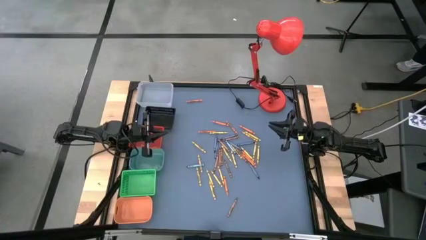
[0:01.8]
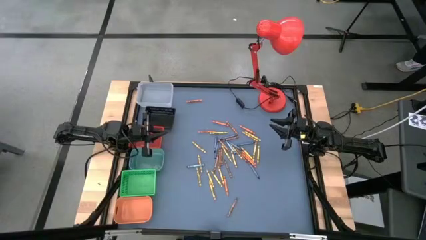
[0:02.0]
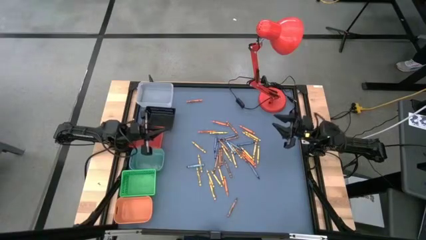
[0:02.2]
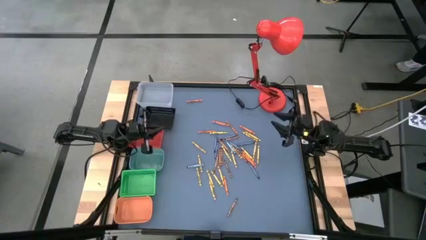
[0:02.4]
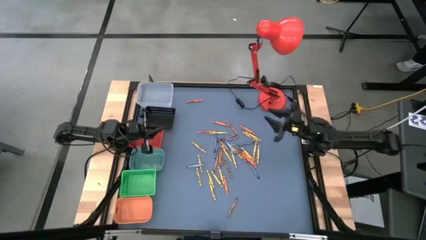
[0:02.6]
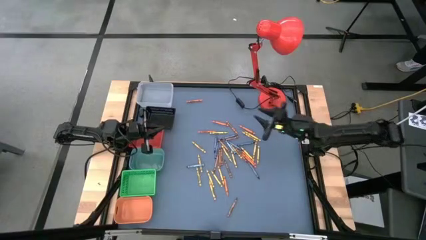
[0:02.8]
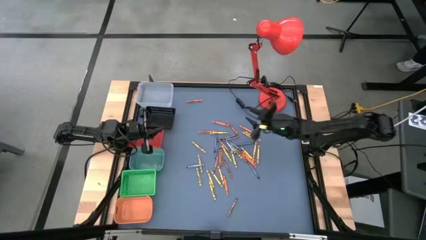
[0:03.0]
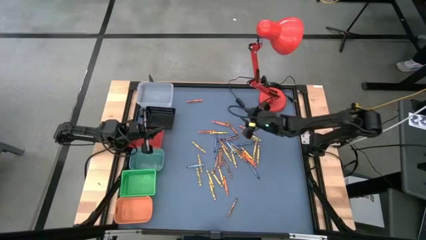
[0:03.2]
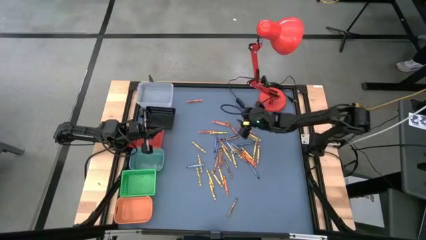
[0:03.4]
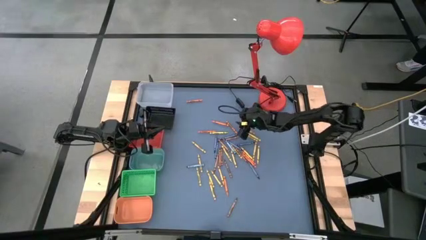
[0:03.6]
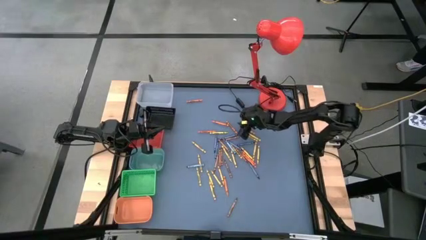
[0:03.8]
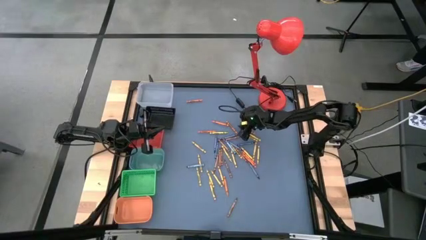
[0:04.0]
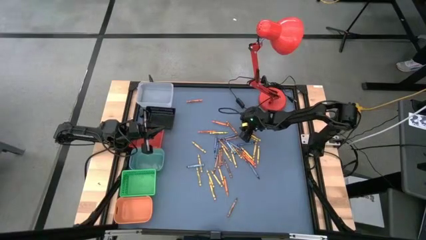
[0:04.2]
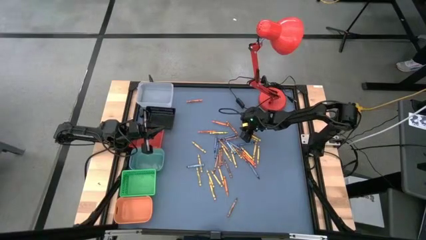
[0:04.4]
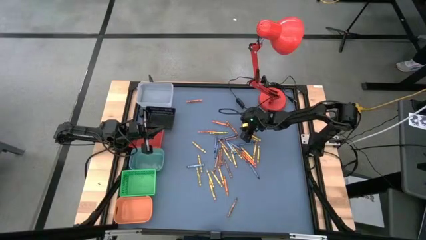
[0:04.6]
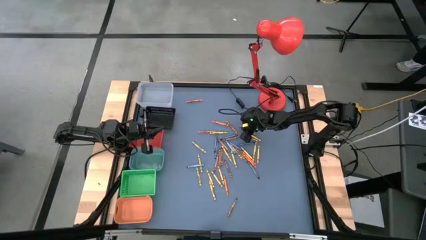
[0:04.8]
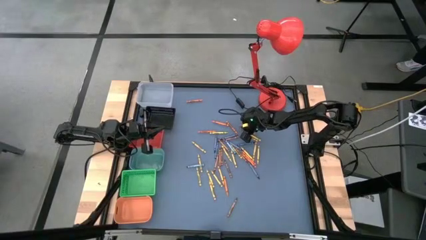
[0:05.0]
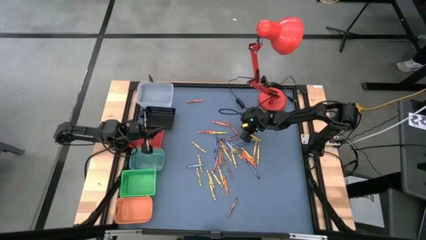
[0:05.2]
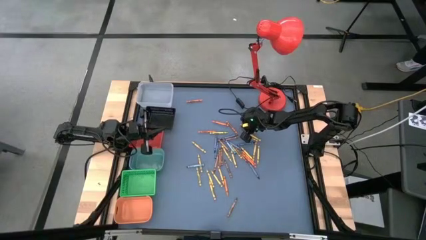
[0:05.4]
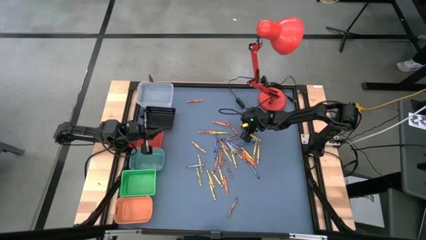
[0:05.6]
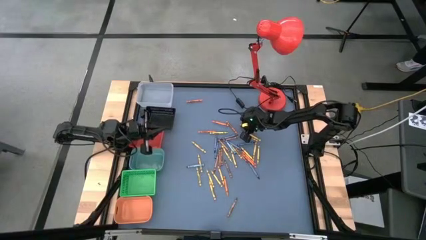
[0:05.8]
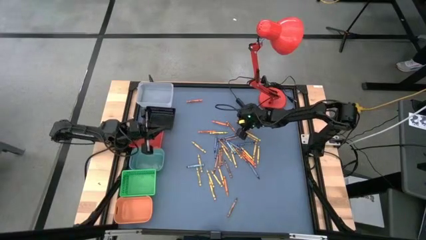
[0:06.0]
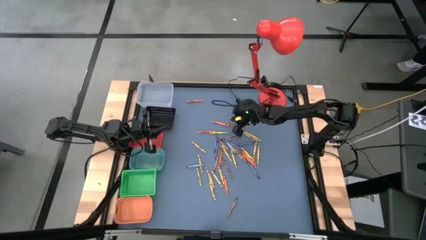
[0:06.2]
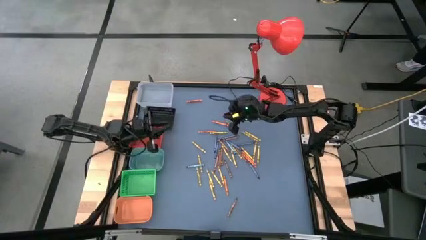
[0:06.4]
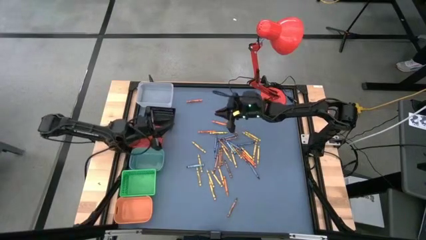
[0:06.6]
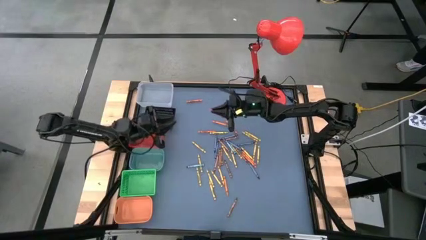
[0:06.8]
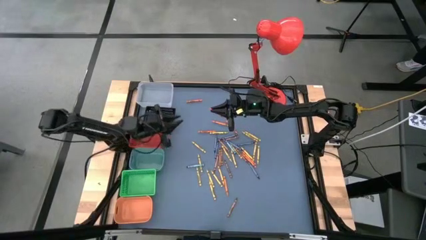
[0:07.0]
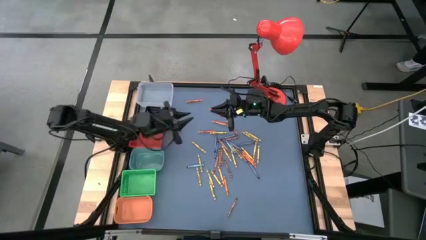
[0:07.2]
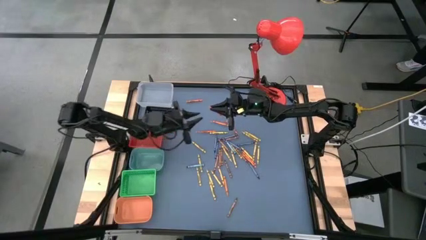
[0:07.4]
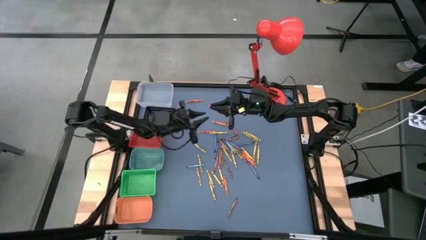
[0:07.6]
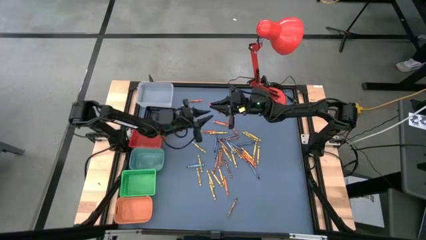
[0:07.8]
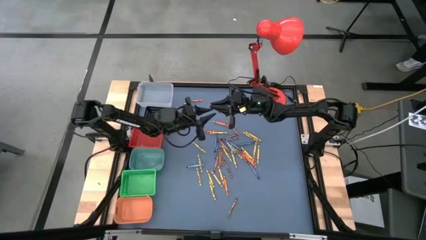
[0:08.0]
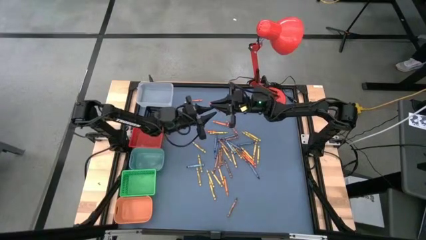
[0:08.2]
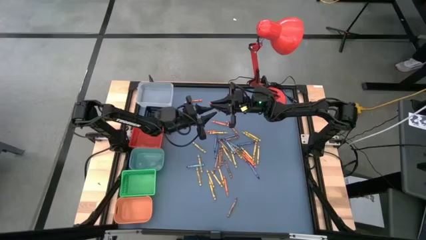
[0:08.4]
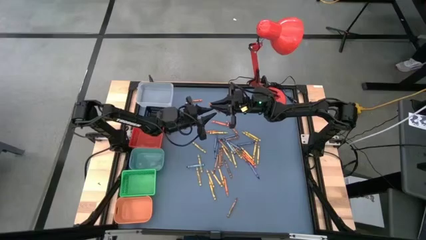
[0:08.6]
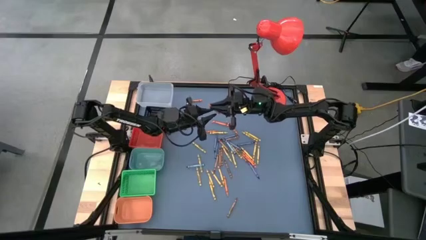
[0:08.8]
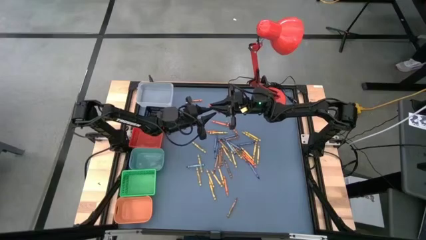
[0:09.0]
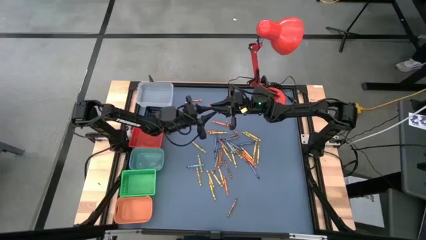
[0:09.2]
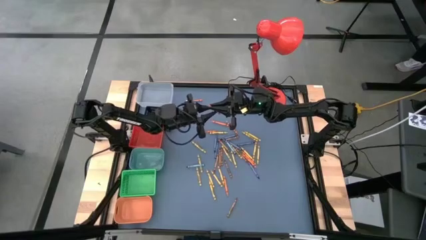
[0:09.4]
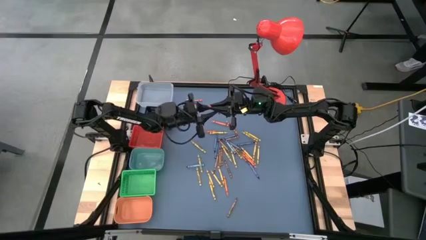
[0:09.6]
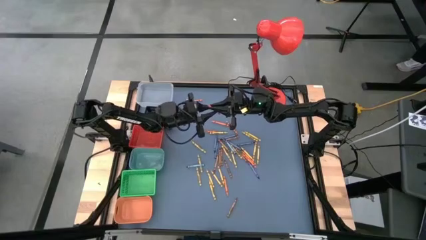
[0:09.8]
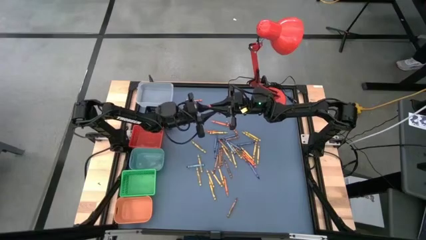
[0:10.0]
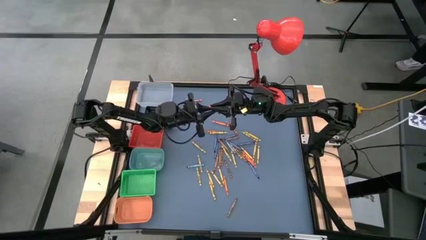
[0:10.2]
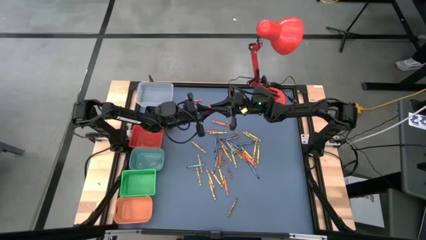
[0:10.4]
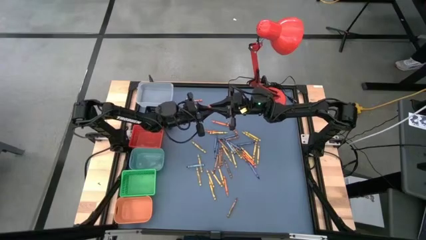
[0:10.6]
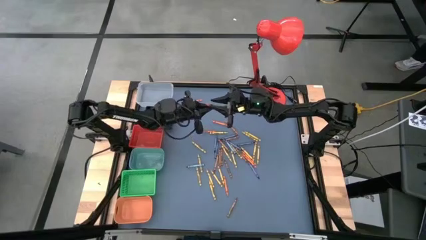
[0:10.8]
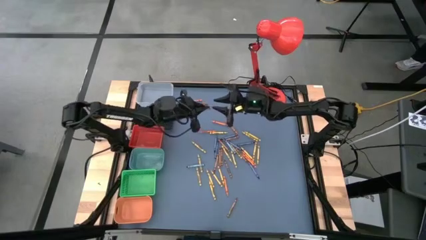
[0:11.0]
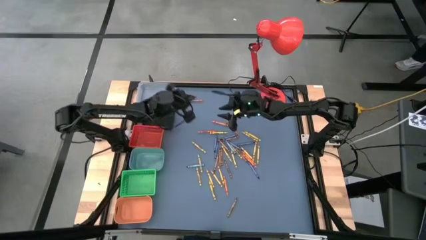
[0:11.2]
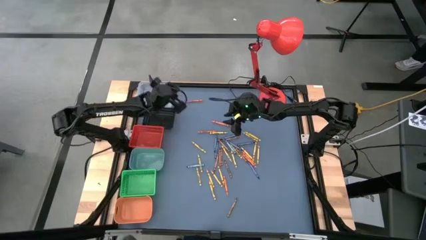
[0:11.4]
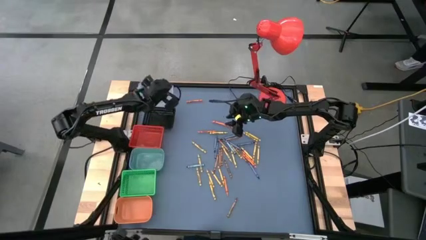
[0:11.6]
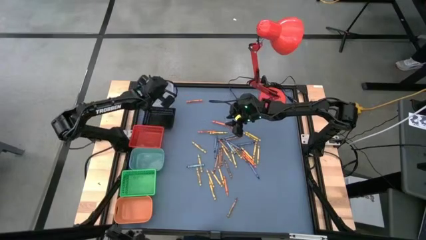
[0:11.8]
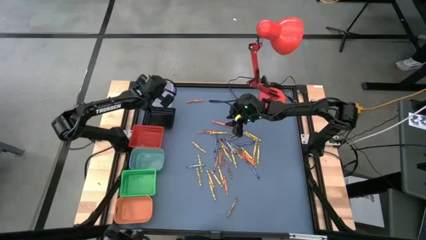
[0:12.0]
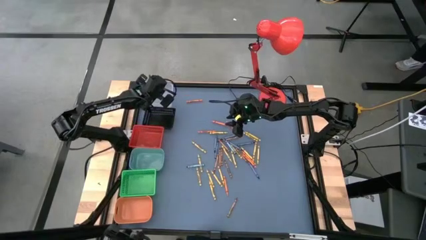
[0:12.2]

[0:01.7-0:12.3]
Task: Sort crayons
Put the orange crayon into the transparent bin

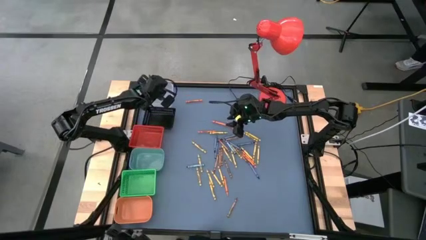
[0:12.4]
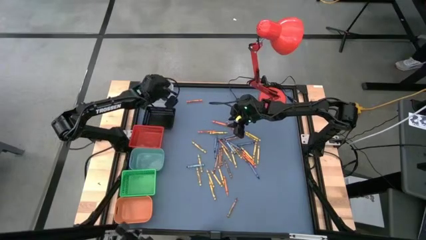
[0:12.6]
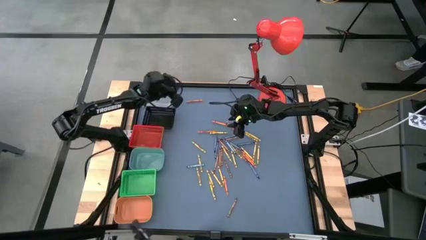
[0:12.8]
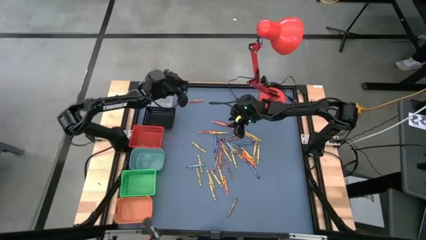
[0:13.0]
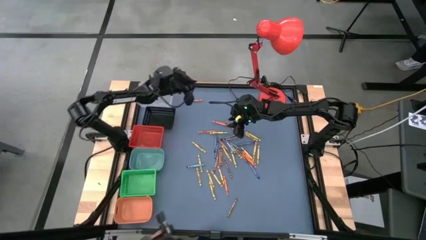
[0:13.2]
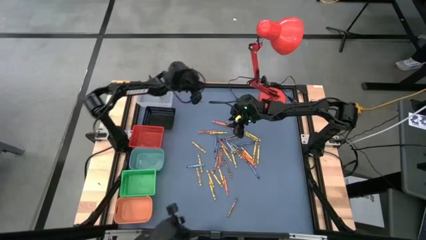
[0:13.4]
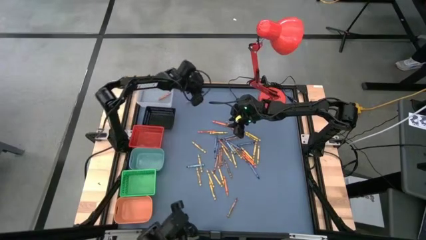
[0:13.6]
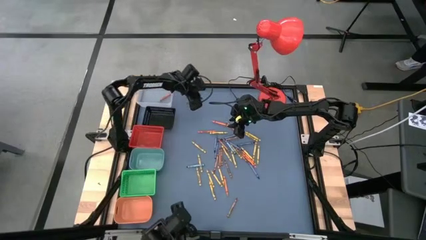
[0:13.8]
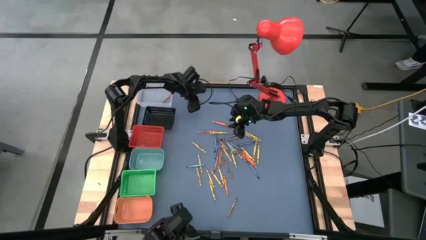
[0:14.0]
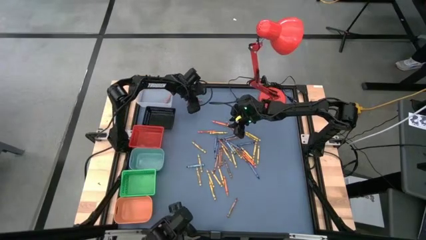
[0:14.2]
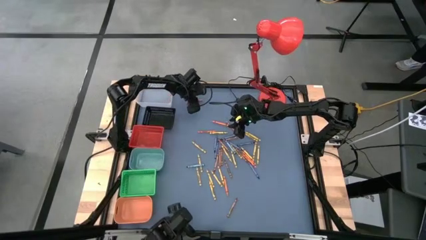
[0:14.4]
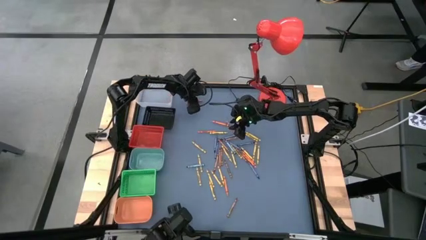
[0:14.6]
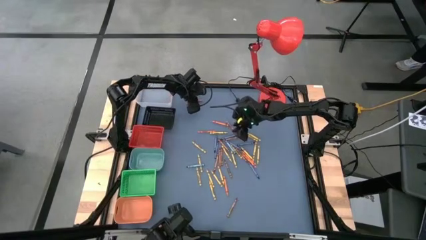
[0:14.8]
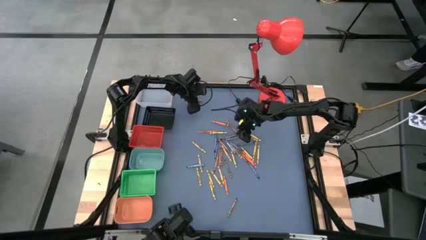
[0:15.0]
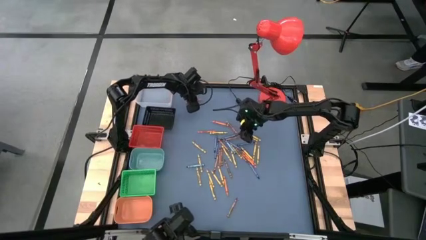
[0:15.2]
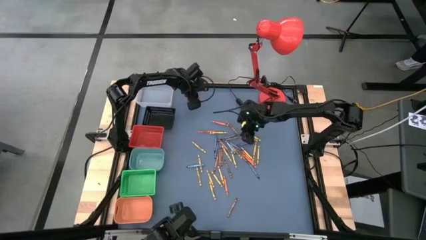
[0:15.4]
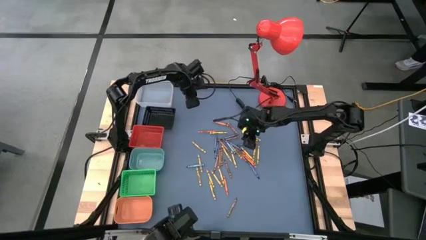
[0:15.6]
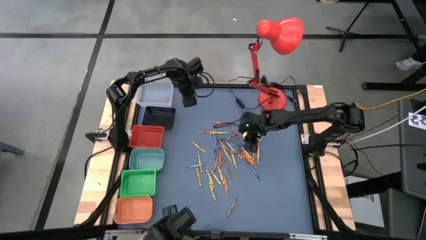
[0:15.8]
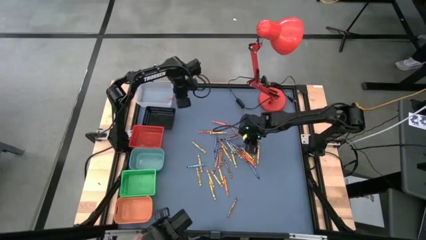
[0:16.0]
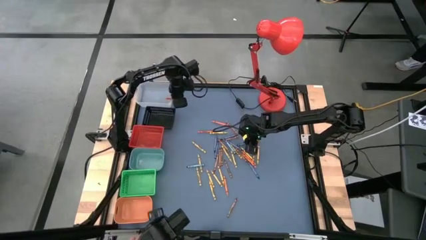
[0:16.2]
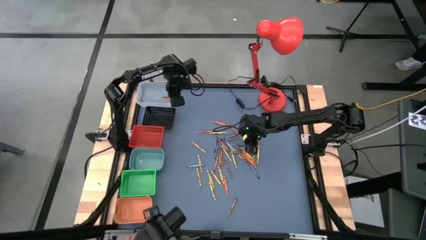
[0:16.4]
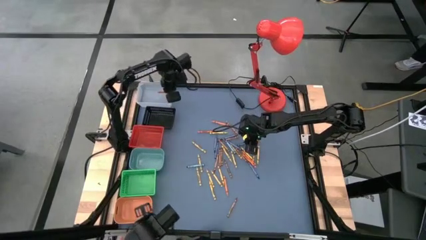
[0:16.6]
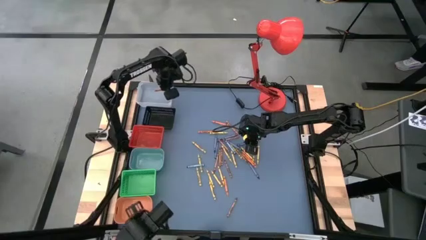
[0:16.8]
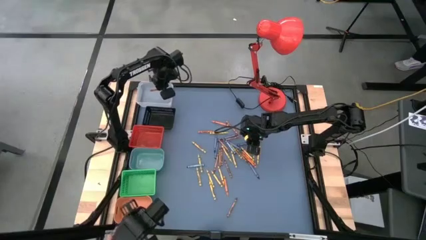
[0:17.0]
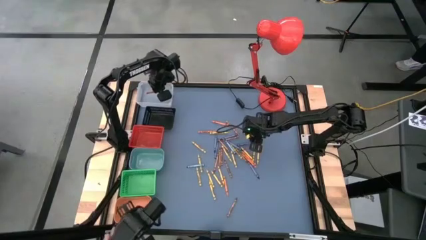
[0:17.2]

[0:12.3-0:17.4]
Put the orange crayon into the transparent bin

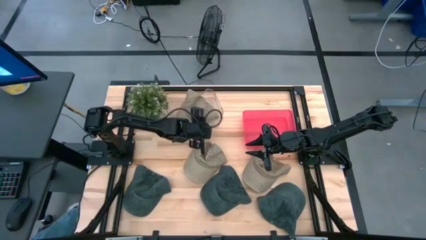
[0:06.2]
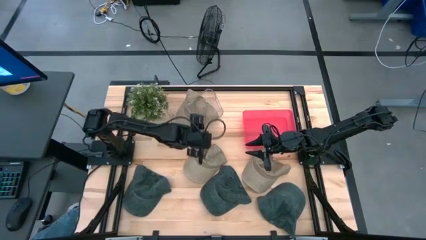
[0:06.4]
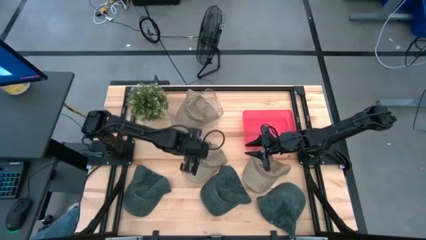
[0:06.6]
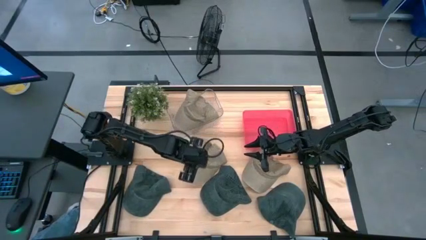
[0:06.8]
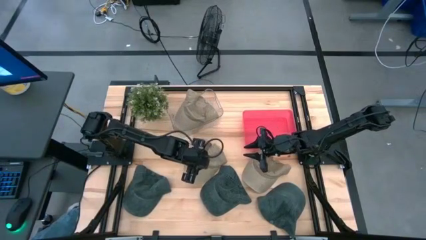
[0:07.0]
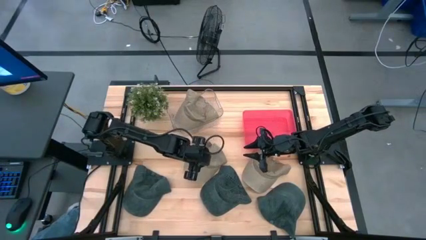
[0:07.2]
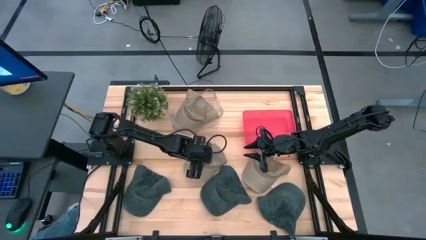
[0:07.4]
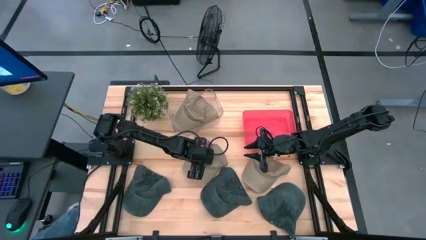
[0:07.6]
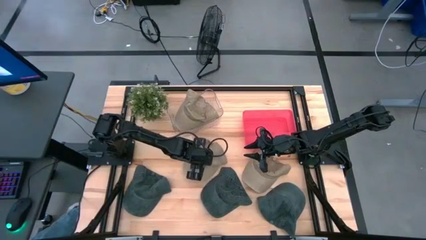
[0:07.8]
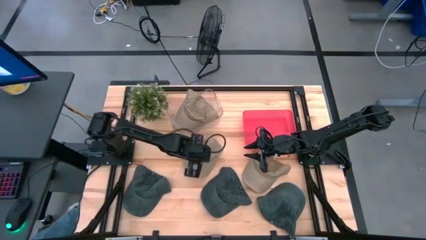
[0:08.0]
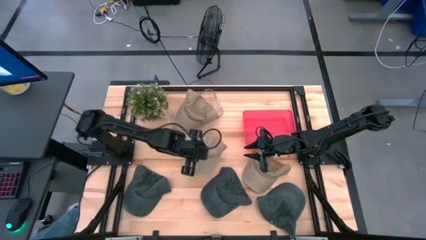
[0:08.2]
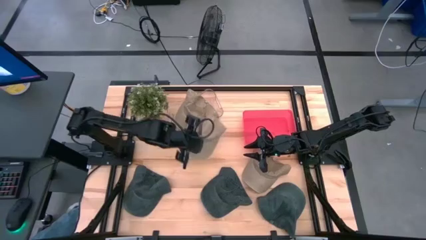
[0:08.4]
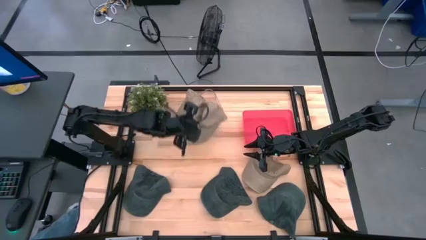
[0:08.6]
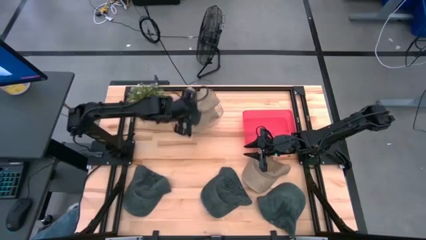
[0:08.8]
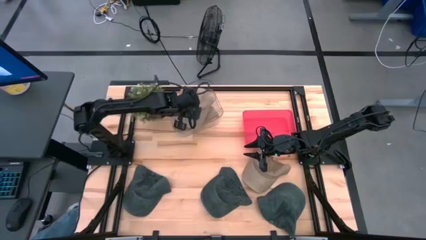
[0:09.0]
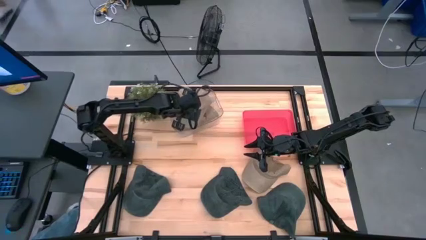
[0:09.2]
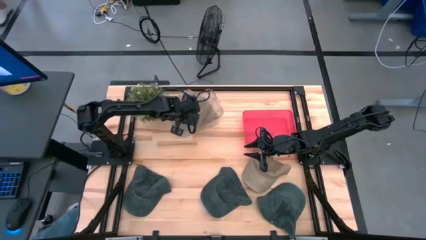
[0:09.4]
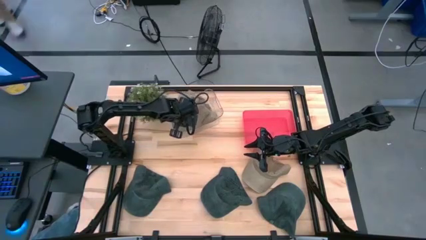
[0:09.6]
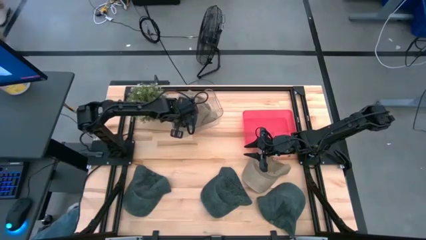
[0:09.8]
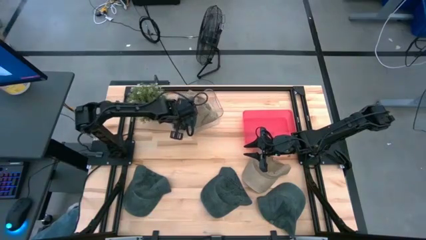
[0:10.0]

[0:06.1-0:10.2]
Task: Pick & Place hat
Put the left brown cap into the transparent bin
